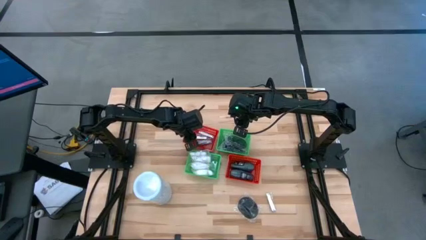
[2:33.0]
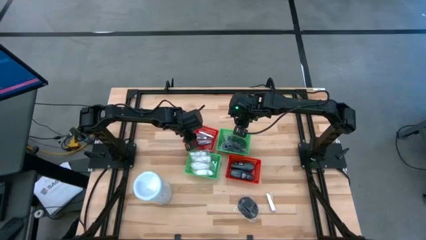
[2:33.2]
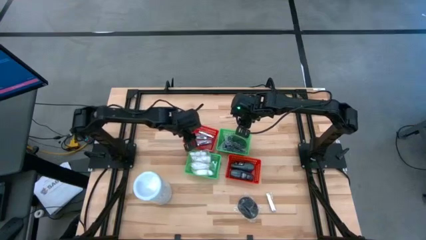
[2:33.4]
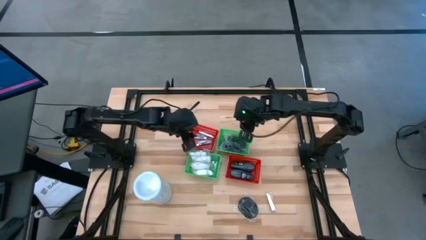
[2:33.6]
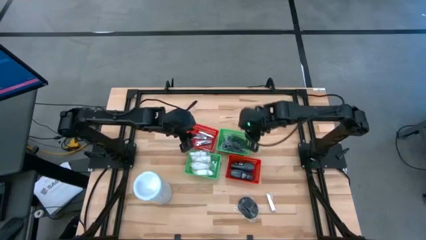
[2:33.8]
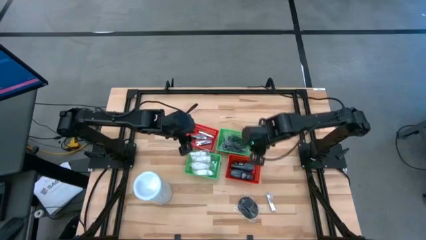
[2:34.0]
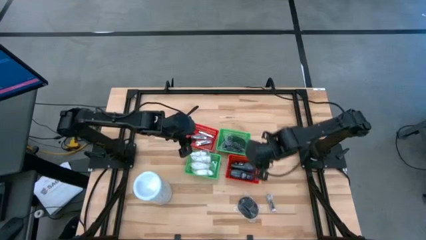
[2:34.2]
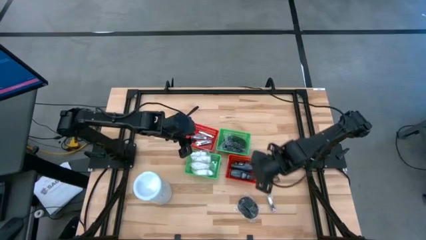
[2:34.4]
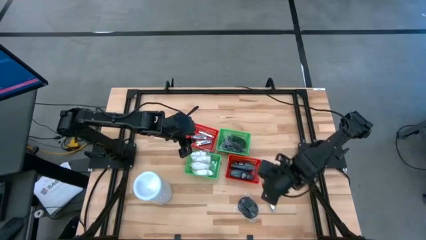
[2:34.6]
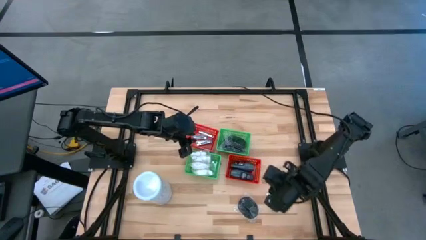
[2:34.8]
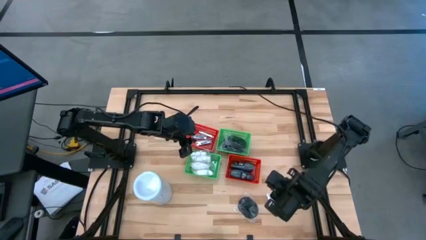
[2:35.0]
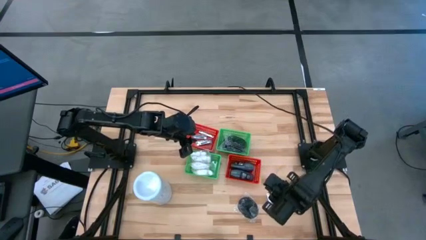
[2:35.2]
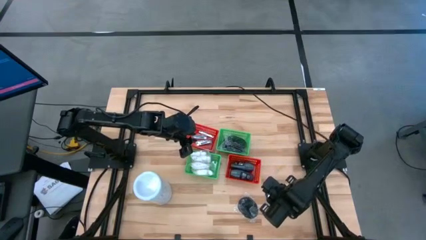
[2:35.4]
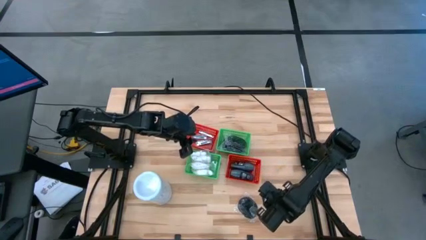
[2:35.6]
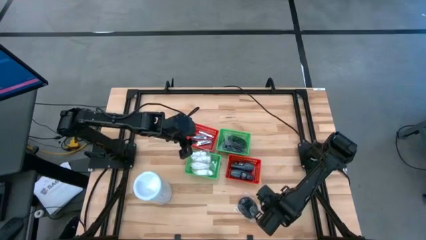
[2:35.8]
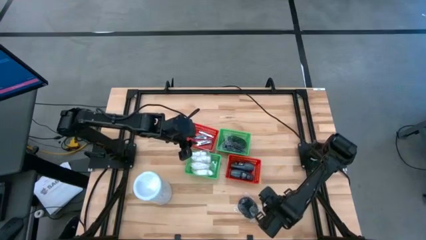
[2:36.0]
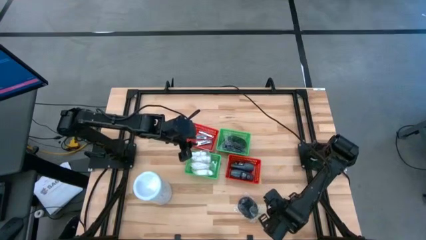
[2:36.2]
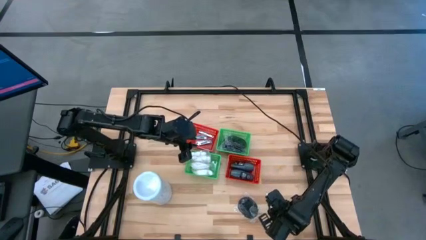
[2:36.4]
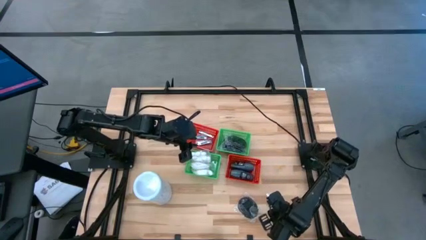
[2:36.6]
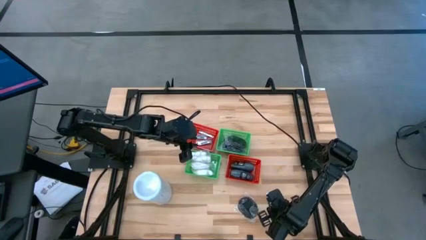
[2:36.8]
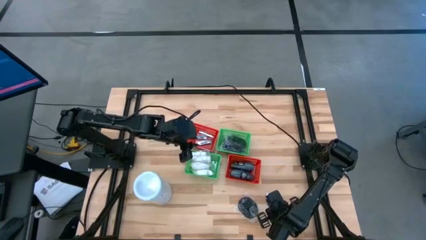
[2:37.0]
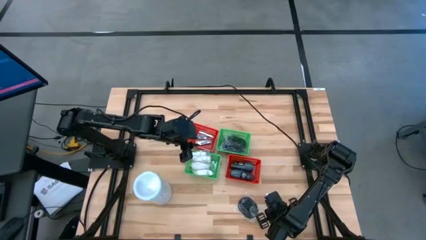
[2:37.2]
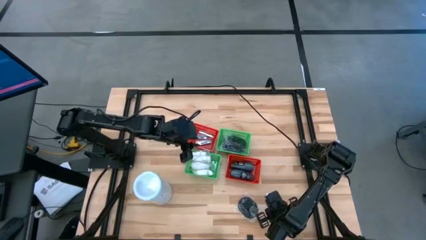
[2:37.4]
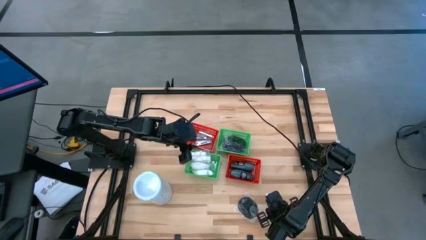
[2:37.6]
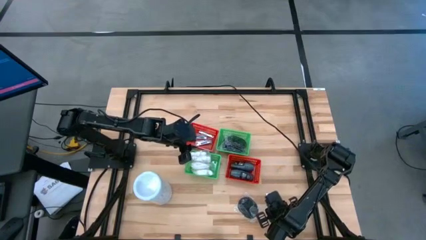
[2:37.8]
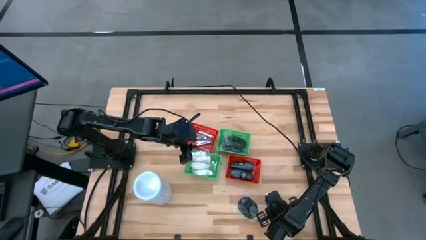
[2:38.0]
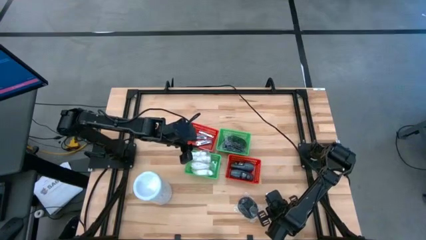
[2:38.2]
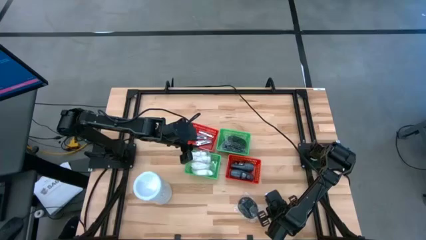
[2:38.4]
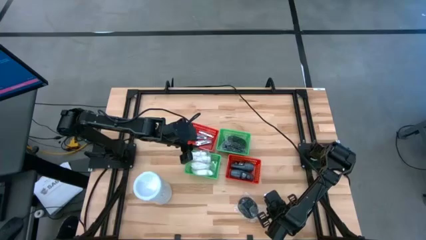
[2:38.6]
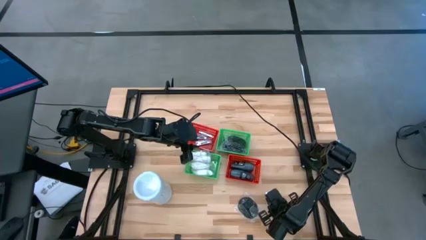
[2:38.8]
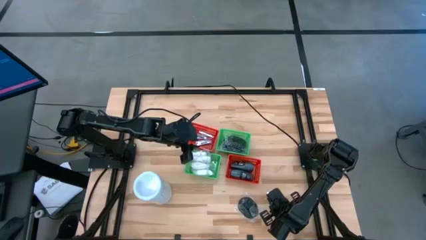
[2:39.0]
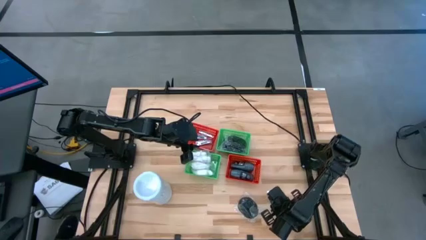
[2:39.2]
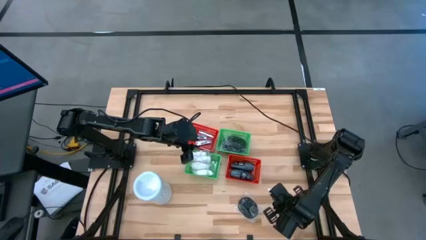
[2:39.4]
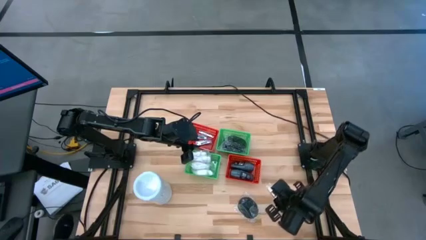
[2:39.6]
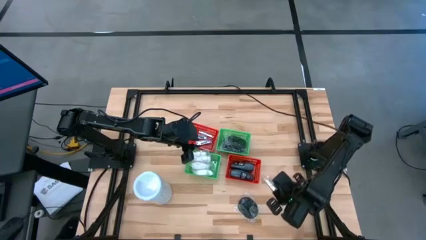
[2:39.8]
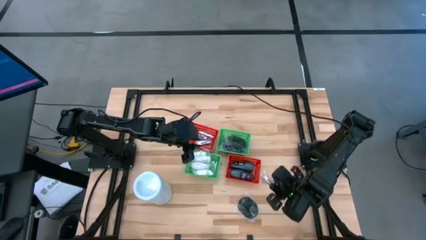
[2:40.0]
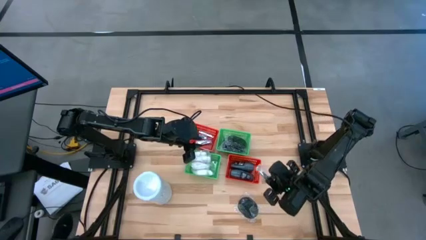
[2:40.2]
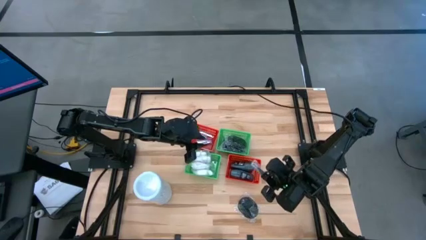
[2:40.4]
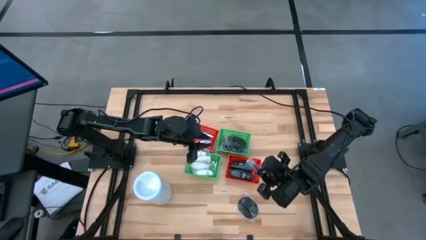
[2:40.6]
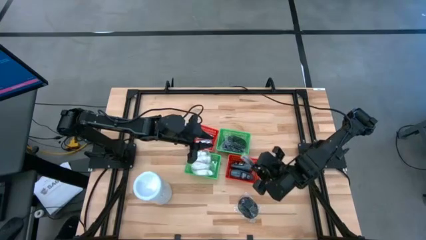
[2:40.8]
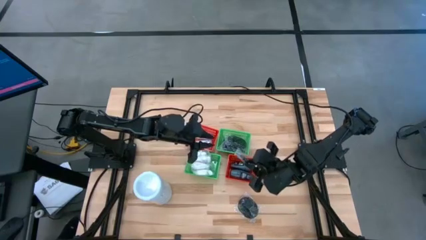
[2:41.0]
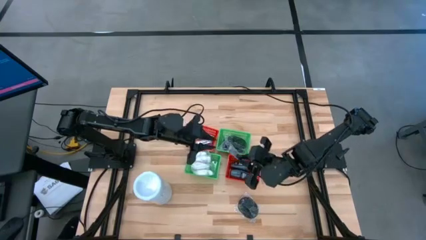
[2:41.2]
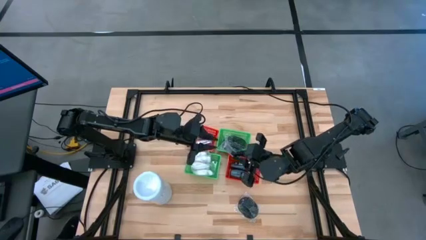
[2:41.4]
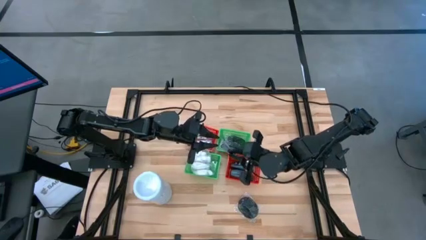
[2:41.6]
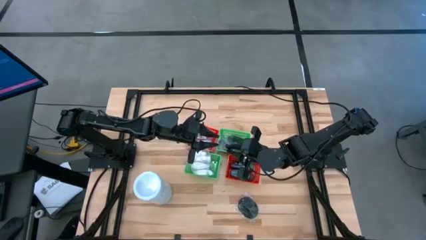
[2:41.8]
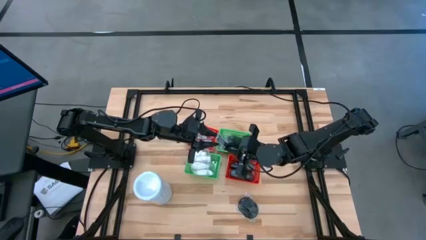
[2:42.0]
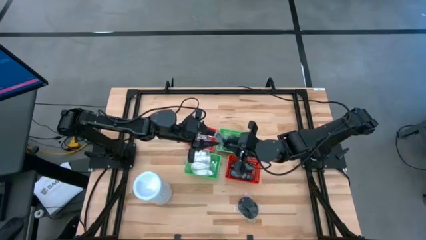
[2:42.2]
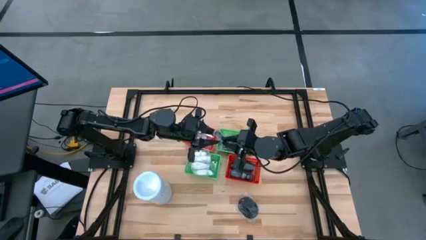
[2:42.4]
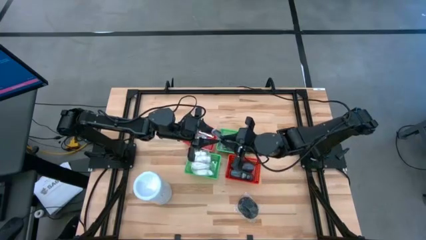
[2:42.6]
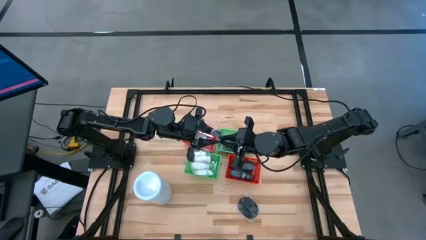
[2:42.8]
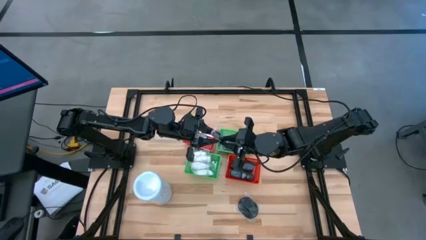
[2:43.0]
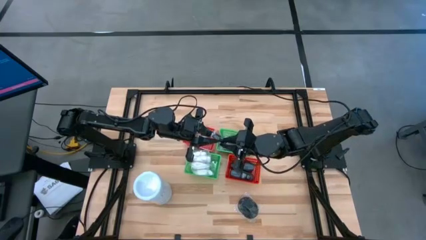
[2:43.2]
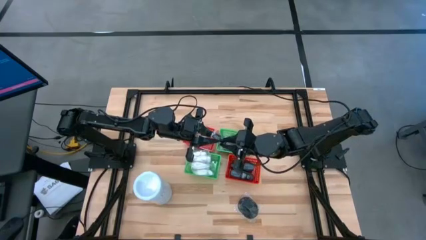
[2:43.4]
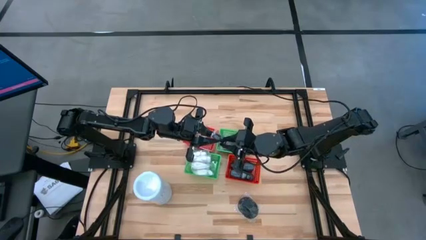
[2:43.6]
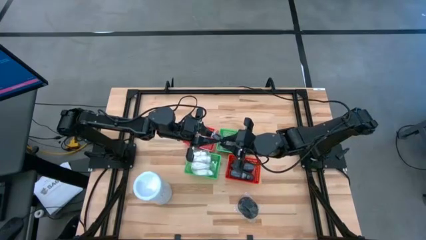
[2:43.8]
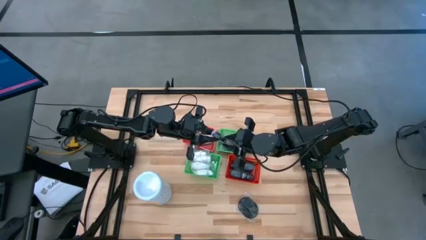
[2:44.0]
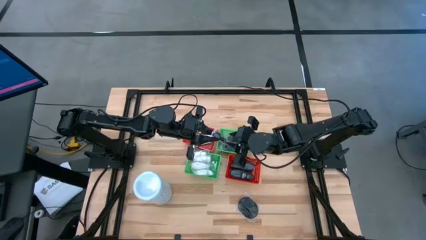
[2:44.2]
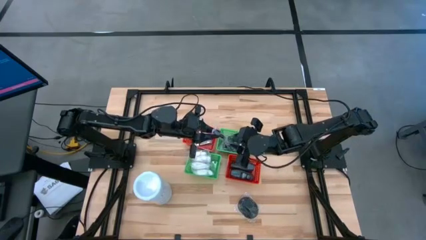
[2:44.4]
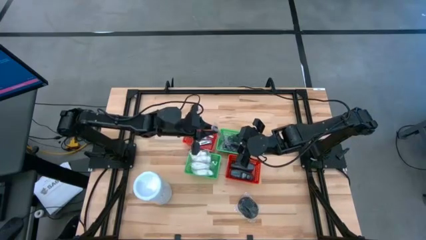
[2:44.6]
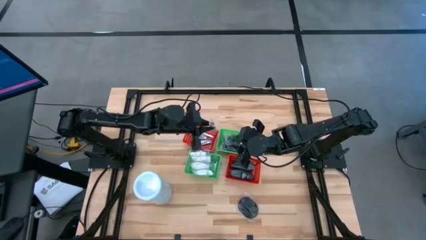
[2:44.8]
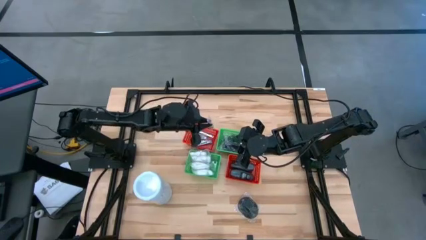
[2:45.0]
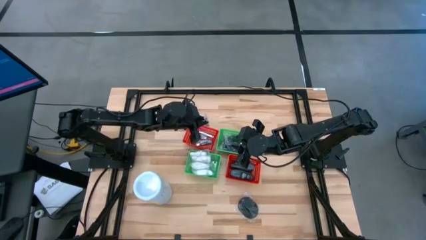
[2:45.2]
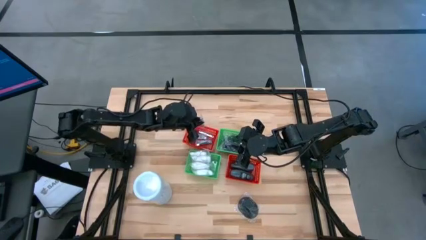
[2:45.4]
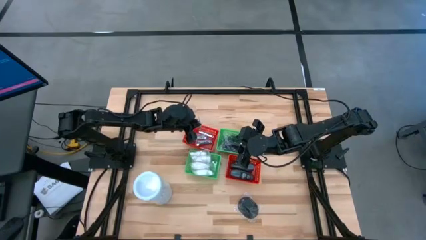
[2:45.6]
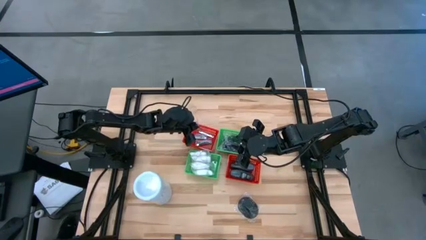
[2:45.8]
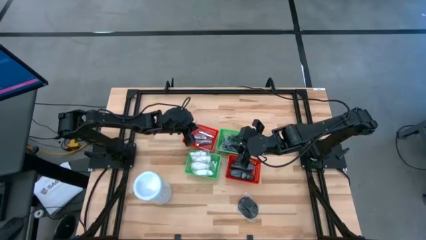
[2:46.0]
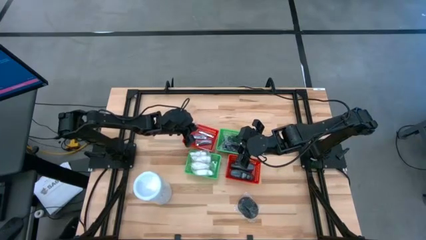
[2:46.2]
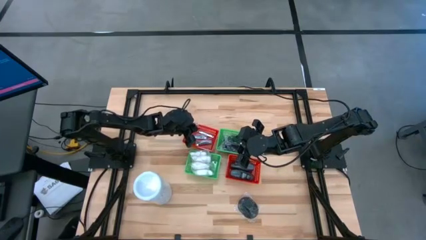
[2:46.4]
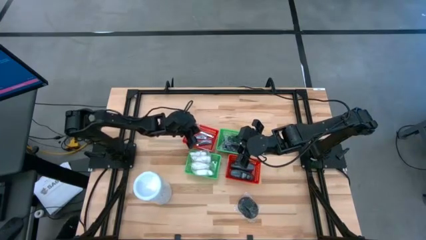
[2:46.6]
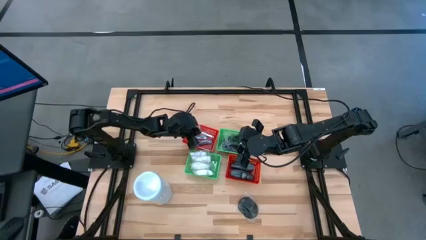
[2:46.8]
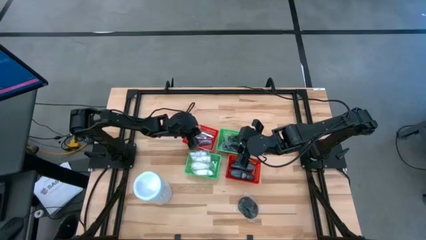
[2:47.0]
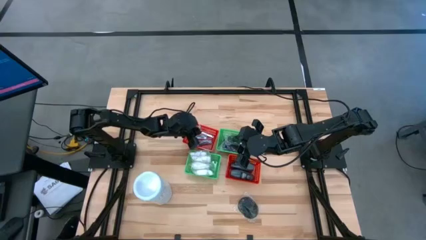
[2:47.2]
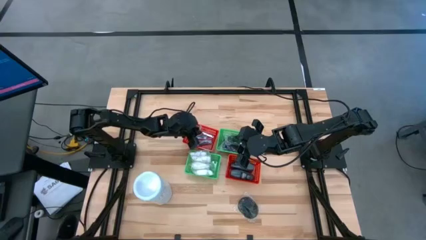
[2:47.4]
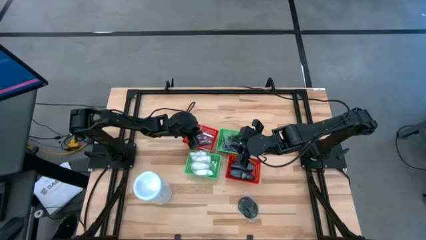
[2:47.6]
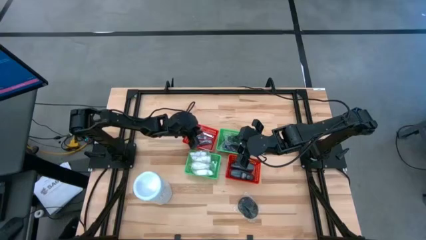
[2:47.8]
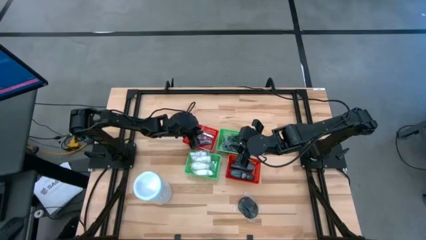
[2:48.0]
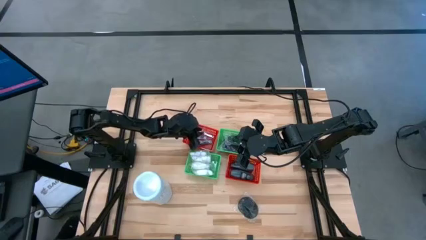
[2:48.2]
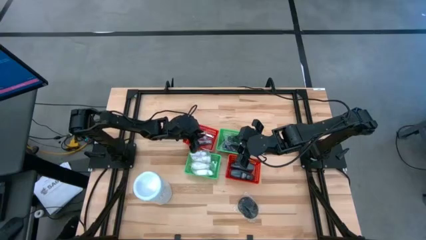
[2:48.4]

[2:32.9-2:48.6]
Task: Pick & Place Travel size toiletries
Put the silver nail cutter into the top left red bin
